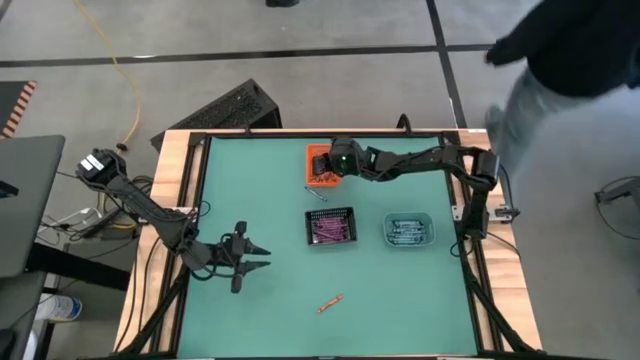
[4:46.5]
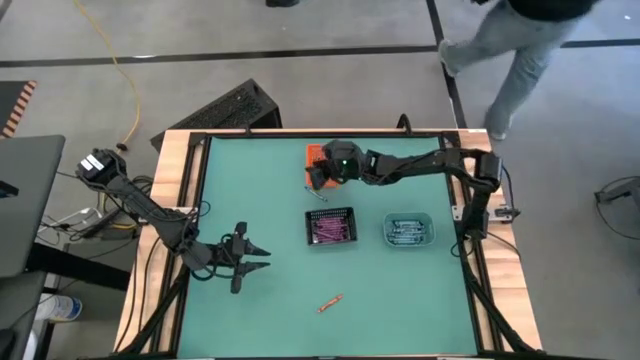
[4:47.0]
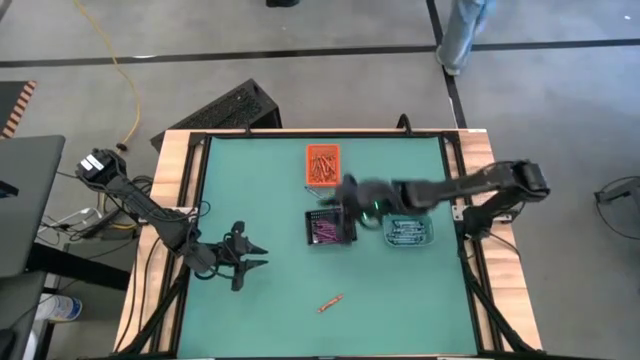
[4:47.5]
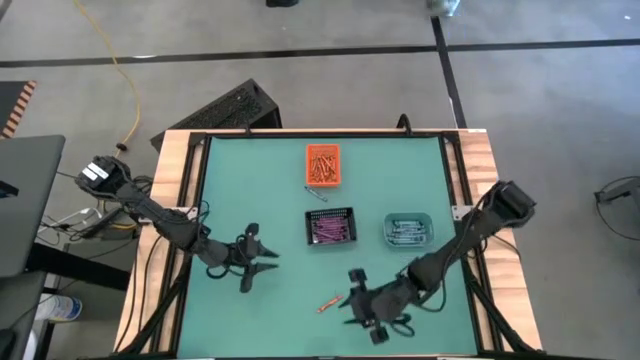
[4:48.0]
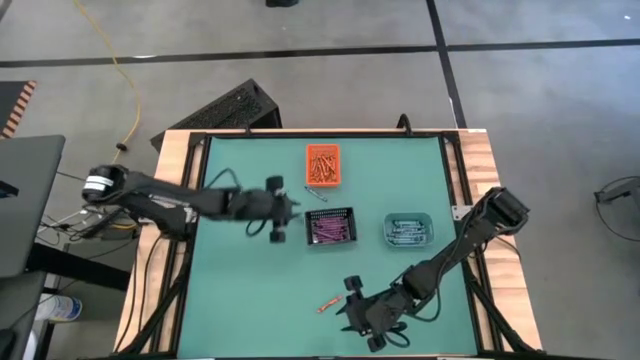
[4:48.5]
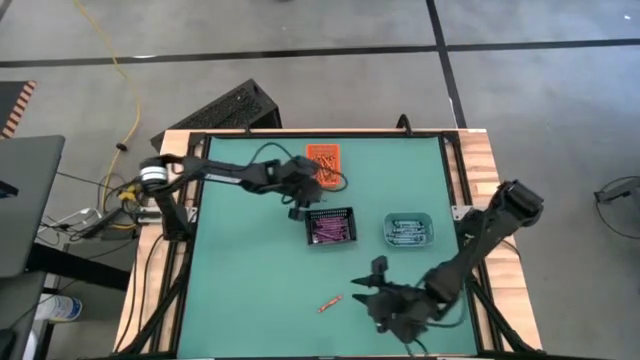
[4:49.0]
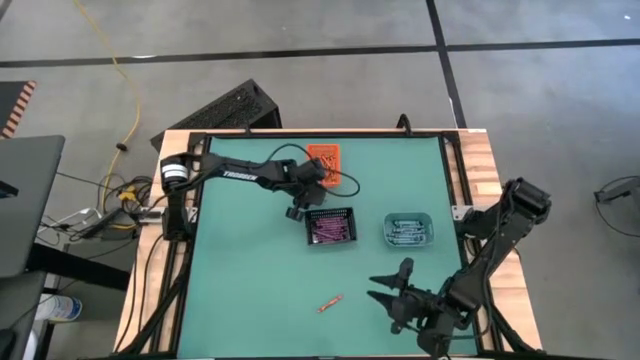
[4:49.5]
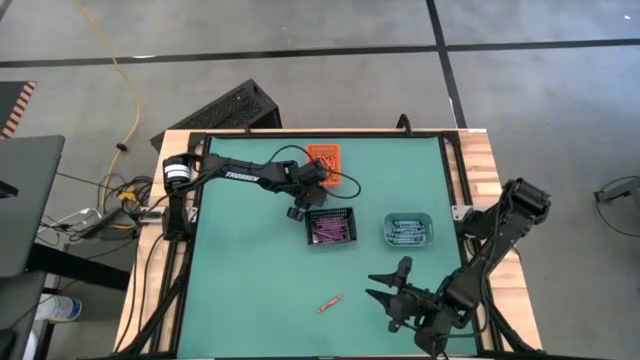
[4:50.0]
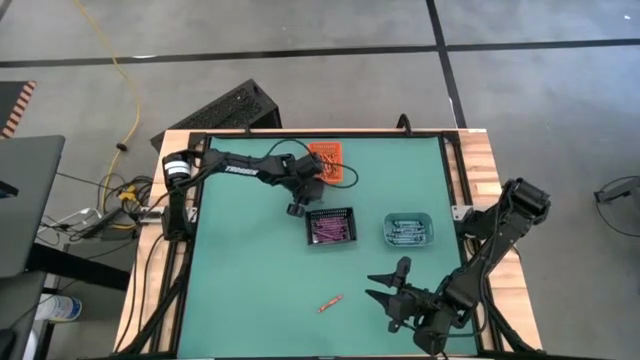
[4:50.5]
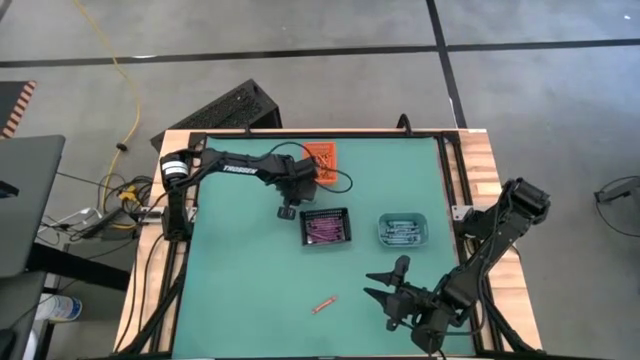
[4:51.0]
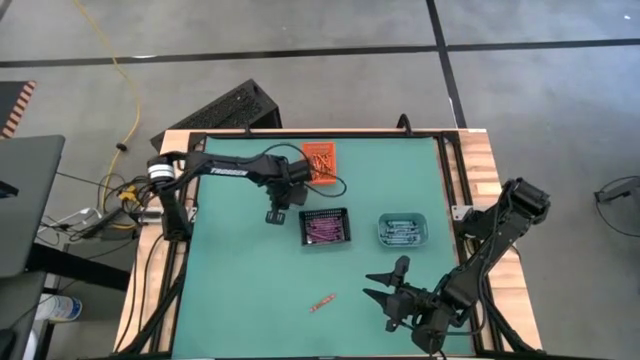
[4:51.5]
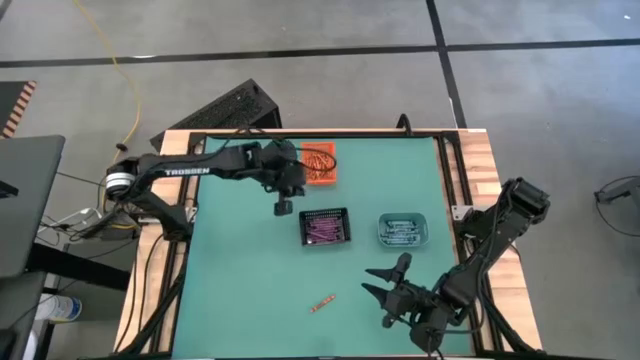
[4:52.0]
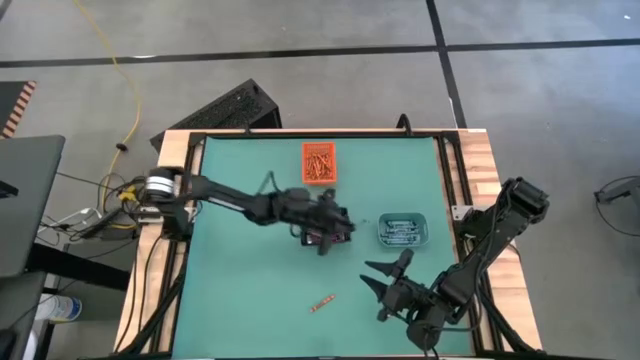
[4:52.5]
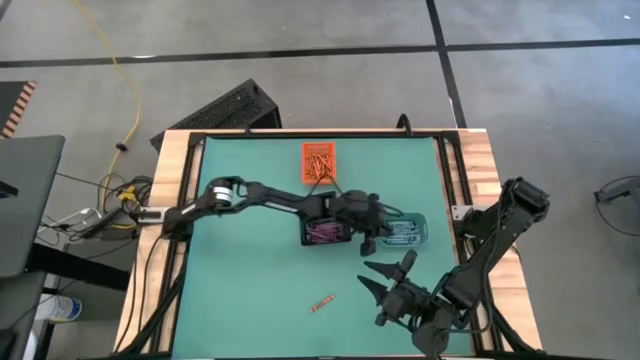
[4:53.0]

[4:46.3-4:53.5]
Task: Sort crayons
Put the blue crayon into the green bin

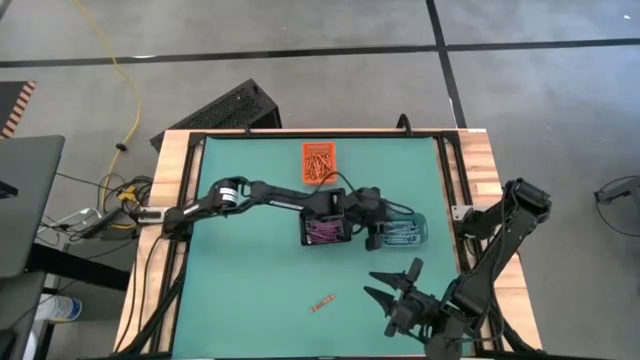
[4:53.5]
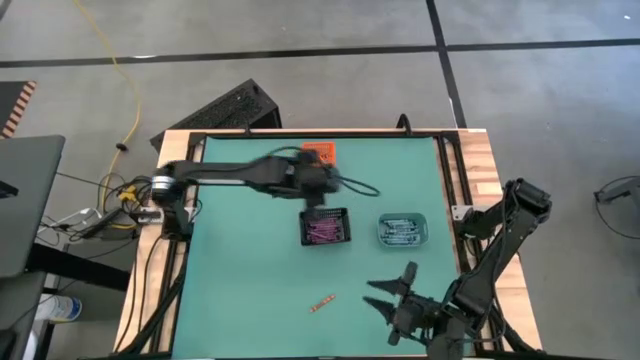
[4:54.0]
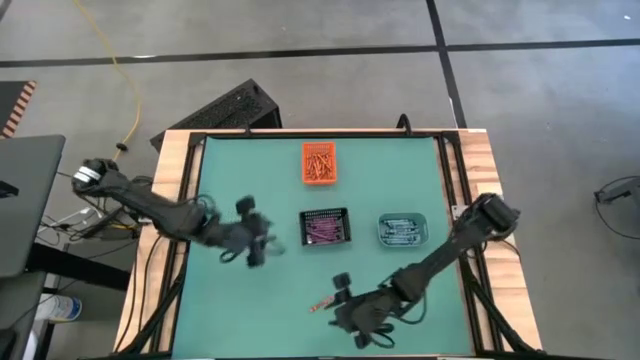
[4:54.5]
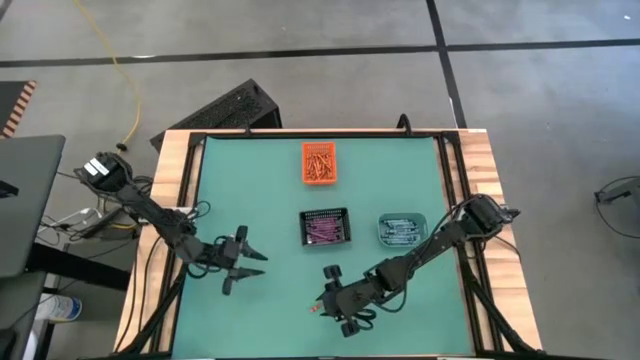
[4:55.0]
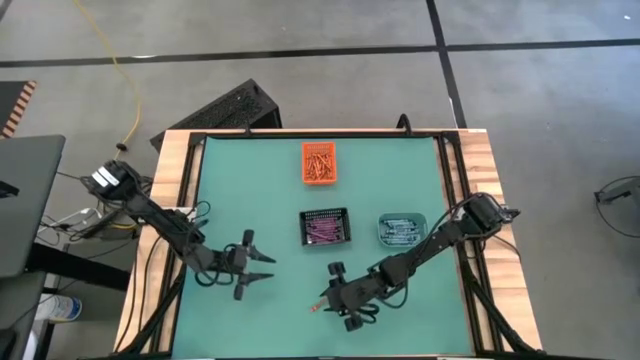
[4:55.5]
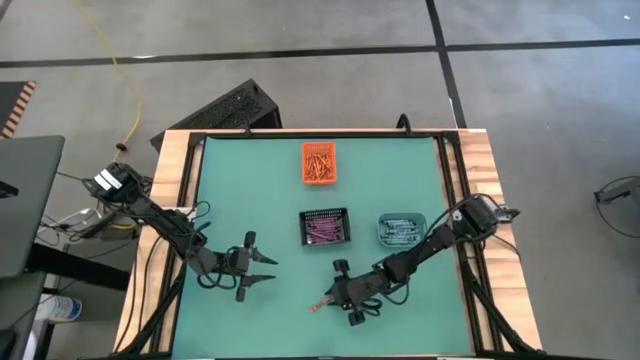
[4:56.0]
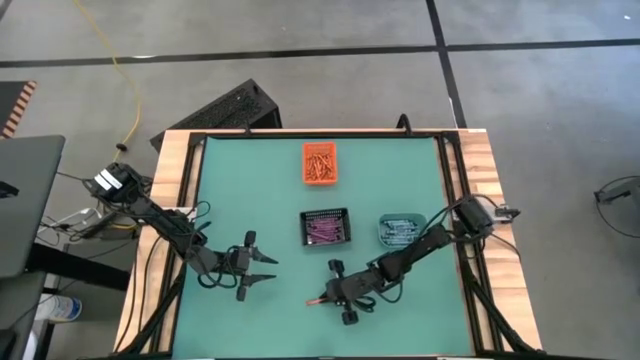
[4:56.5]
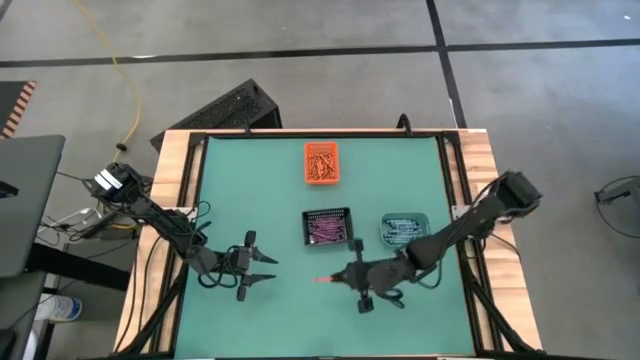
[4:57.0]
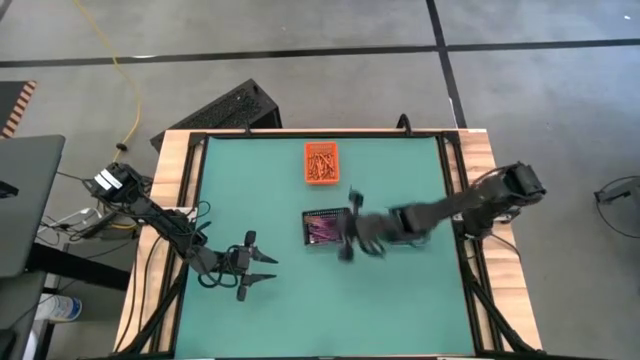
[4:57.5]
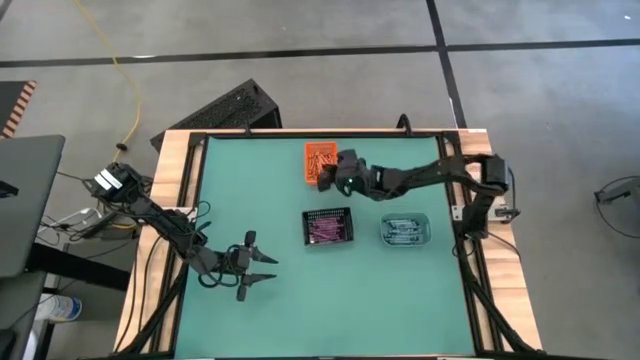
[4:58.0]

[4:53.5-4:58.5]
Put the orange crayon into the orange bin

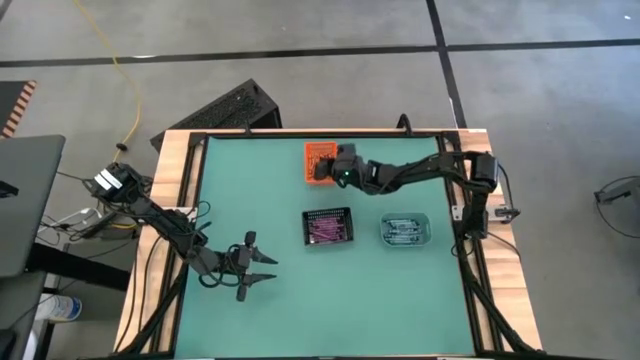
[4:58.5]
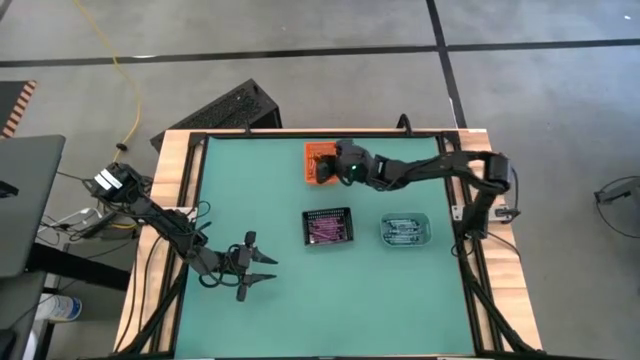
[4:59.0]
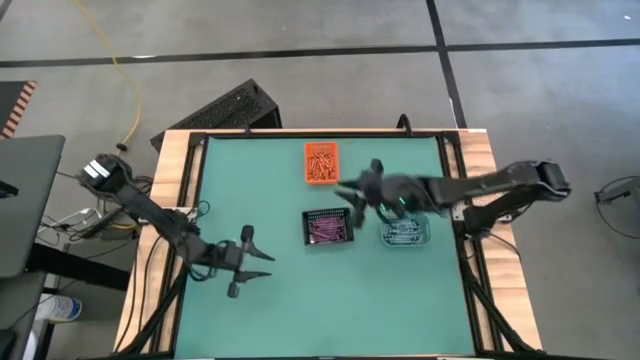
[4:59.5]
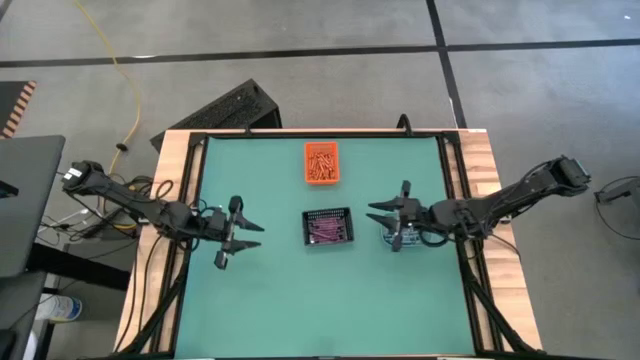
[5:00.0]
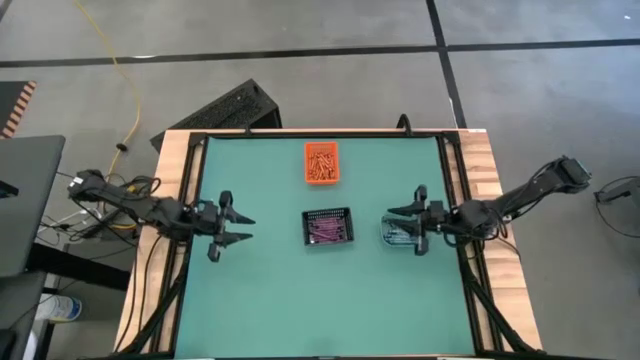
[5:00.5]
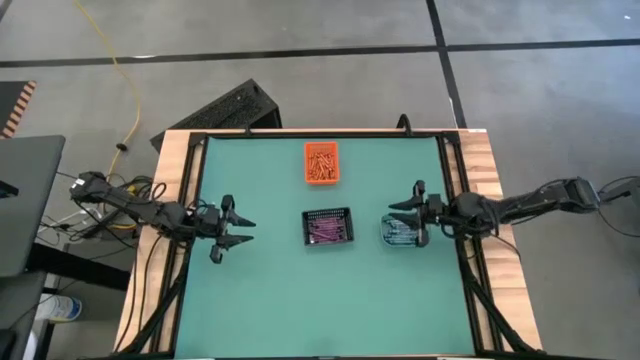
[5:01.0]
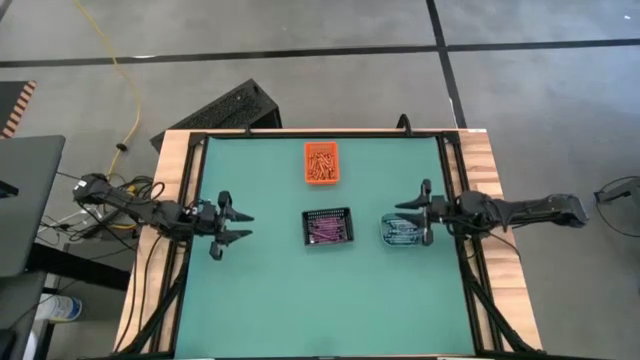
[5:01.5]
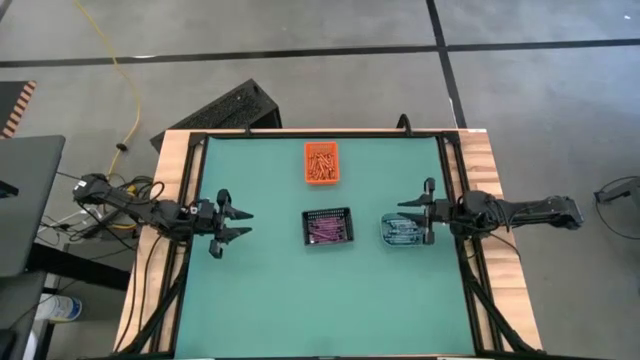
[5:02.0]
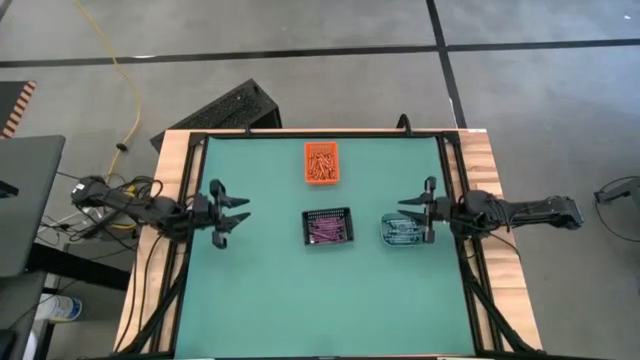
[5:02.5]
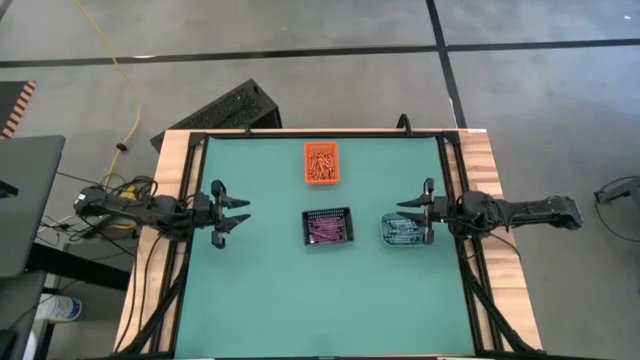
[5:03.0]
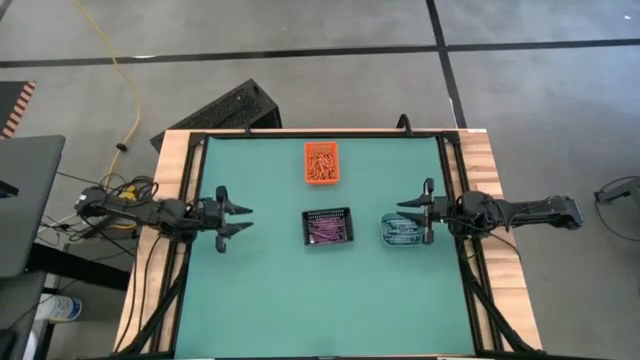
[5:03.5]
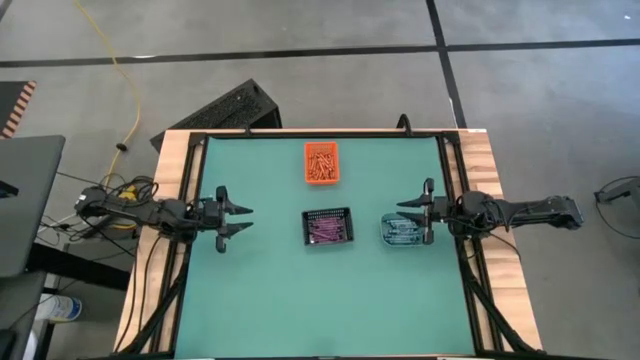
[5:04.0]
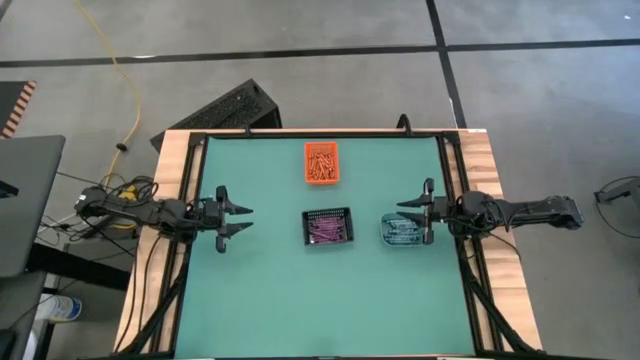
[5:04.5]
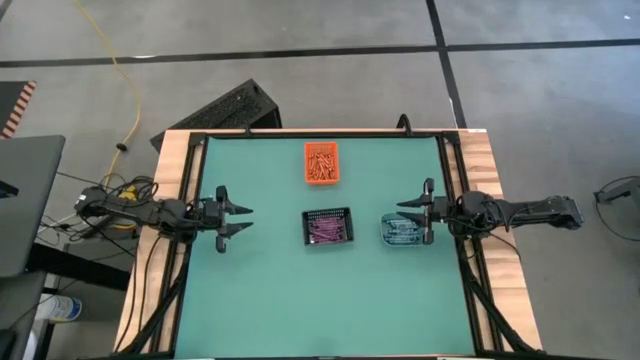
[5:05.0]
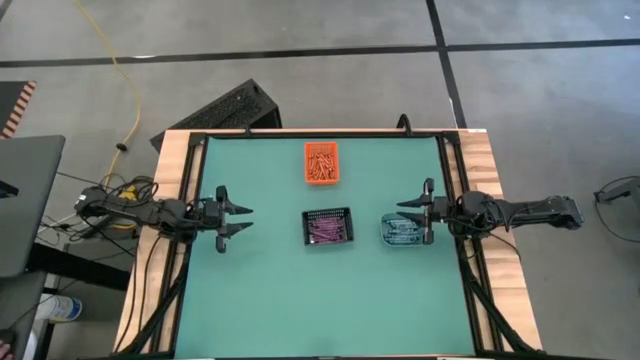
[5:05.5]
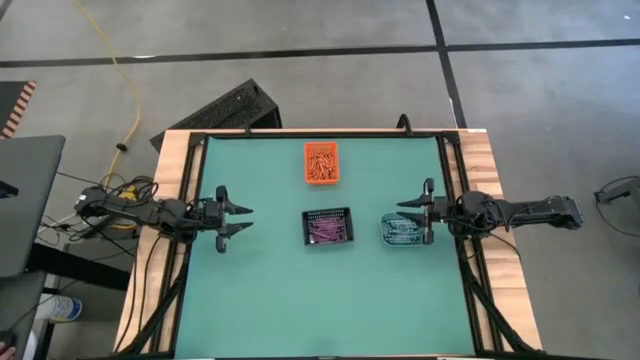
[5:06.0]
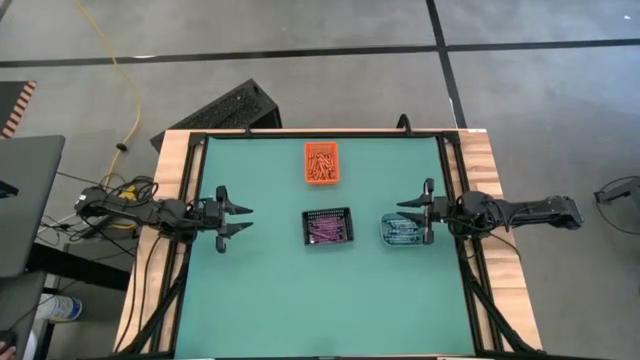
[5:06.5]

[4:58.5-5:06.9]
Return to Home Position

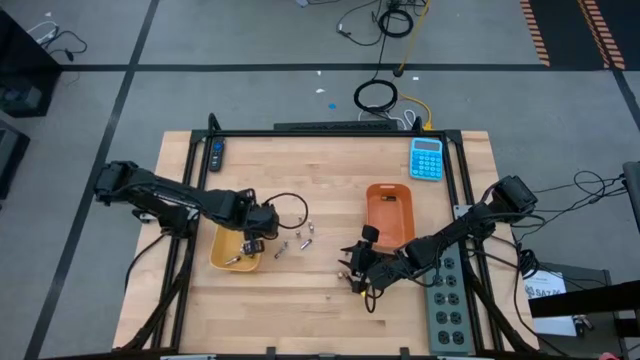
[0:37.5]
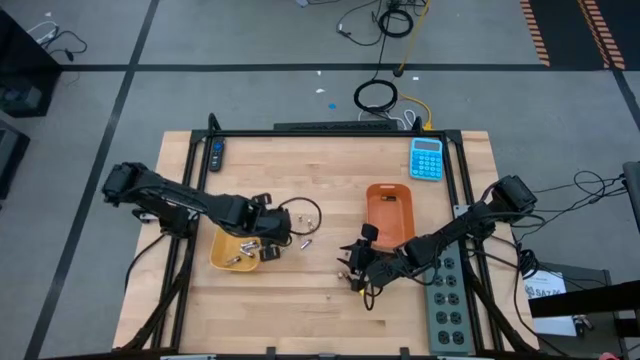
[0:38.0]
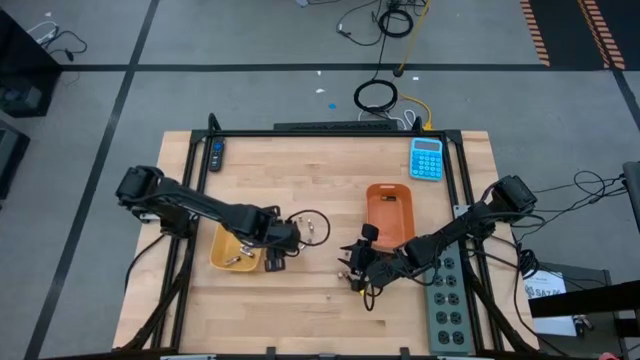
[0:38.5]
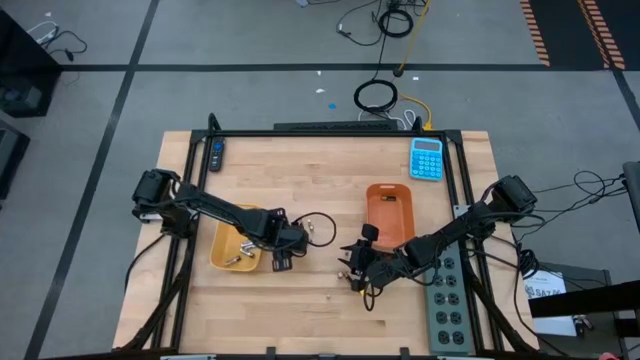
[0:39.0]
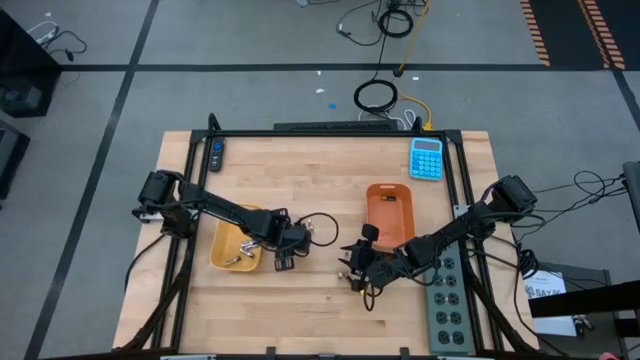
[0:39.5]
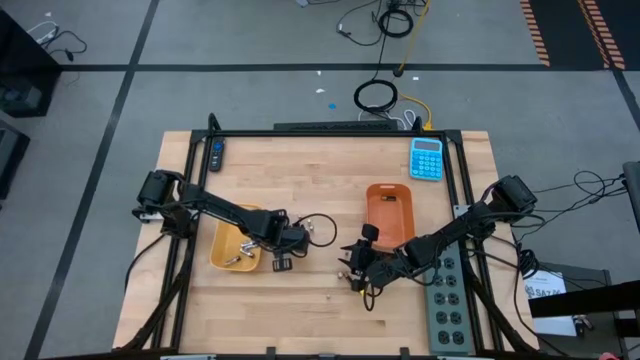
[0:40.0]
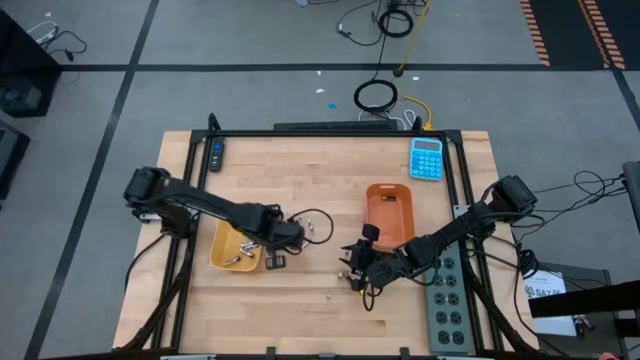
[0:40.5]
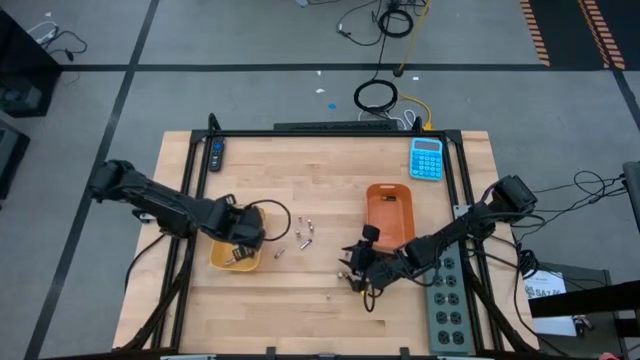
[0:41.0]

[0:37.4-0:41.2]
Task: Sort batteries
Put the silver battery into the yellow bin
